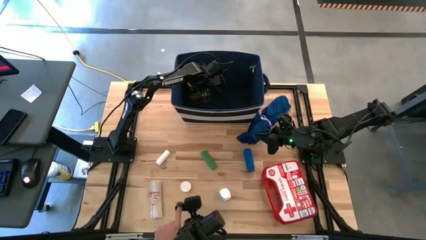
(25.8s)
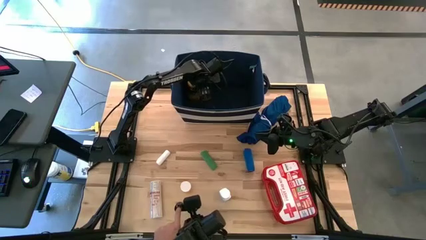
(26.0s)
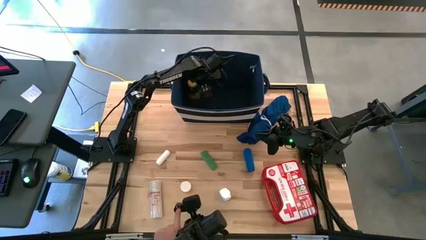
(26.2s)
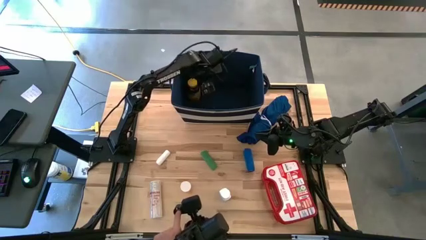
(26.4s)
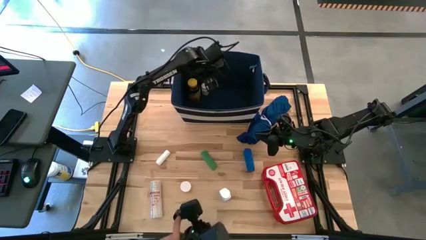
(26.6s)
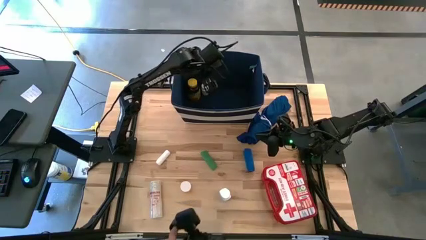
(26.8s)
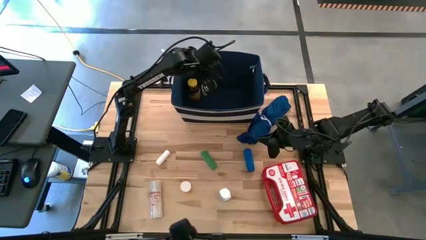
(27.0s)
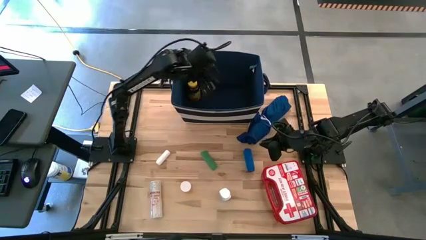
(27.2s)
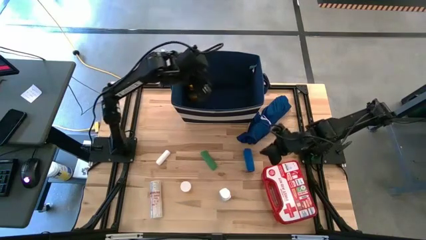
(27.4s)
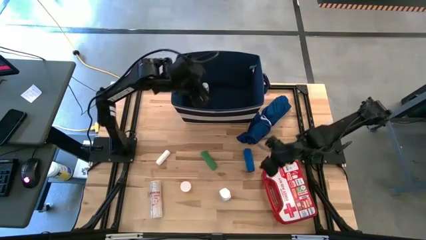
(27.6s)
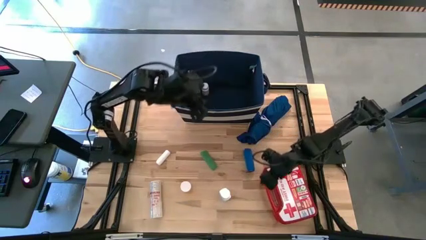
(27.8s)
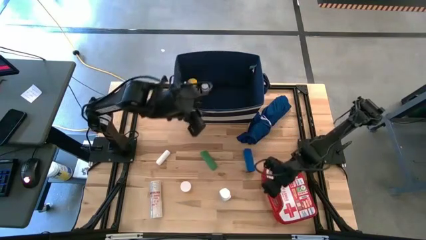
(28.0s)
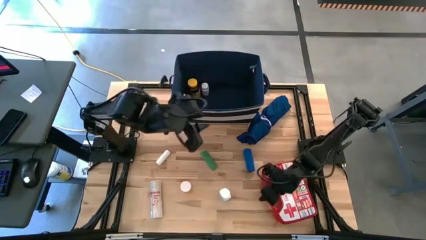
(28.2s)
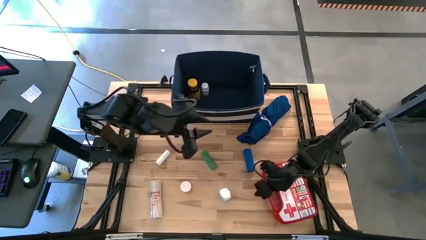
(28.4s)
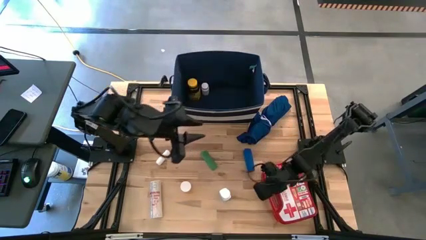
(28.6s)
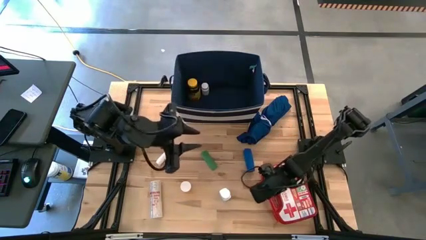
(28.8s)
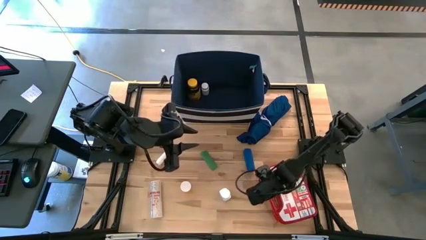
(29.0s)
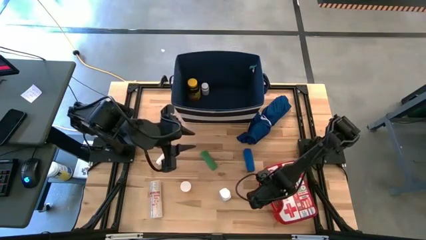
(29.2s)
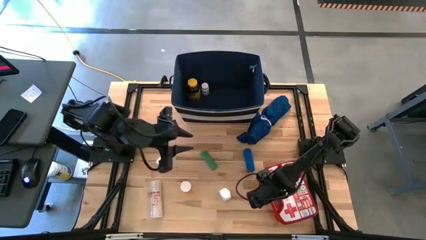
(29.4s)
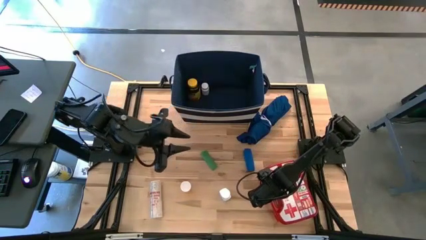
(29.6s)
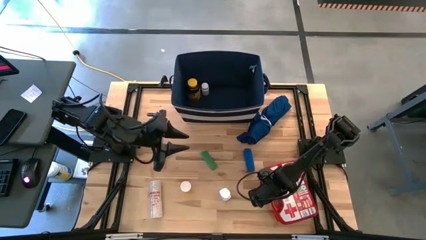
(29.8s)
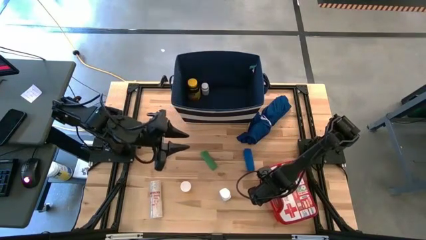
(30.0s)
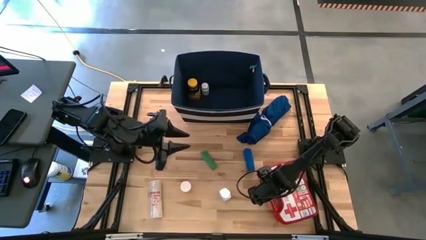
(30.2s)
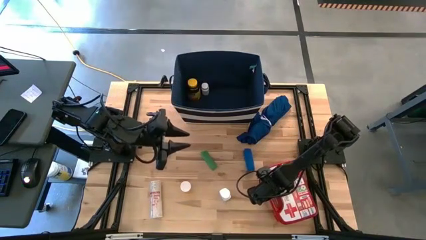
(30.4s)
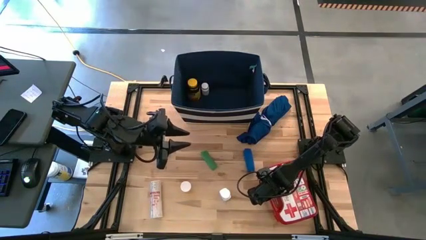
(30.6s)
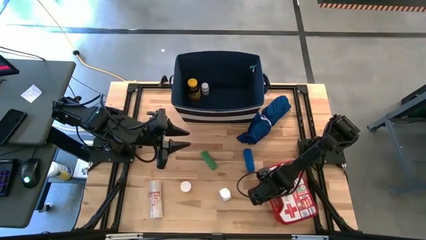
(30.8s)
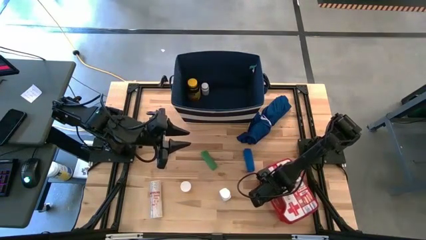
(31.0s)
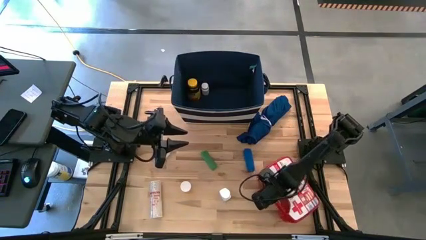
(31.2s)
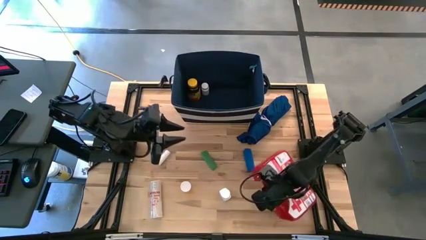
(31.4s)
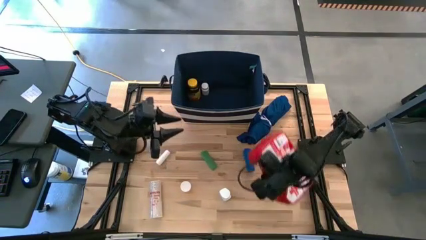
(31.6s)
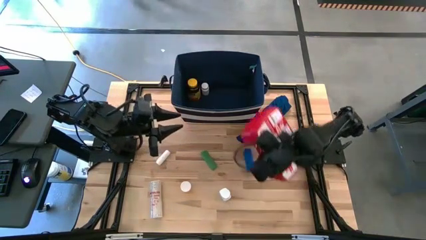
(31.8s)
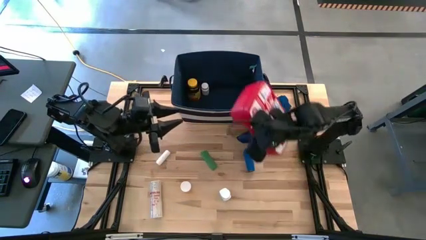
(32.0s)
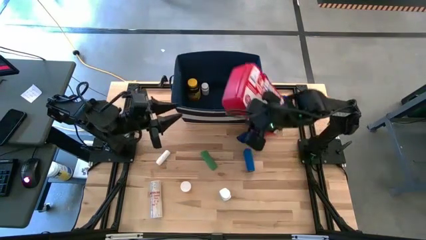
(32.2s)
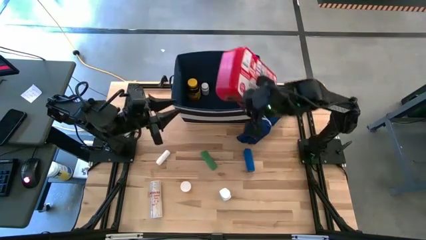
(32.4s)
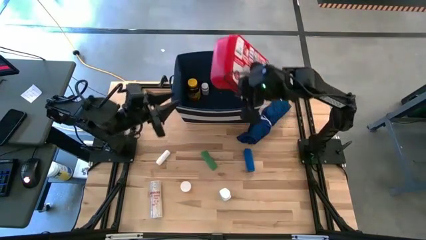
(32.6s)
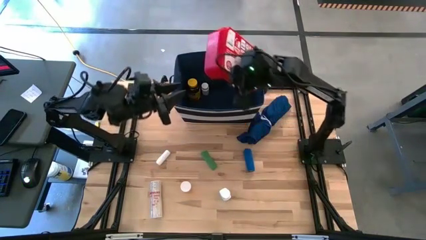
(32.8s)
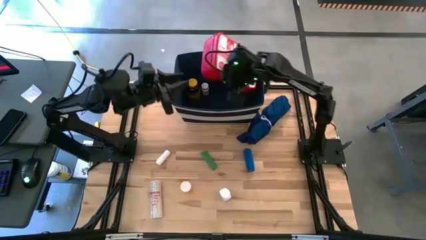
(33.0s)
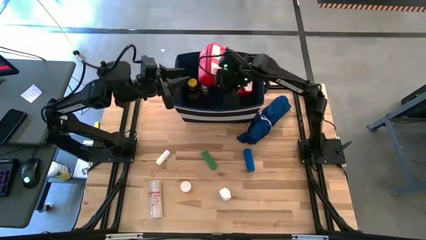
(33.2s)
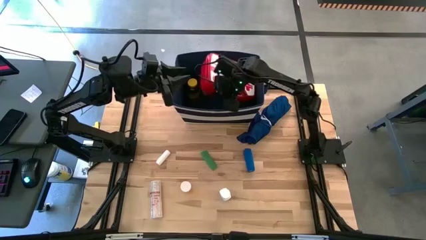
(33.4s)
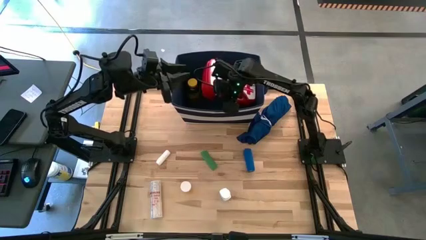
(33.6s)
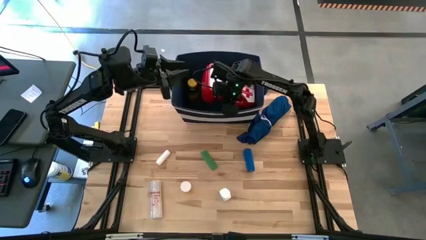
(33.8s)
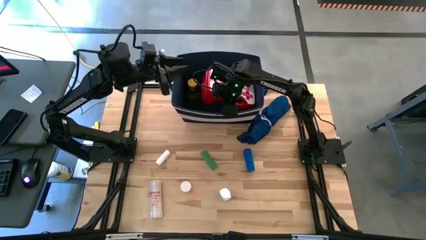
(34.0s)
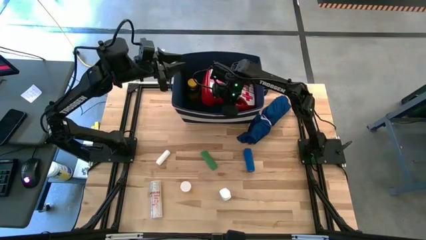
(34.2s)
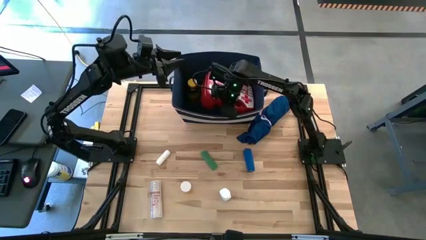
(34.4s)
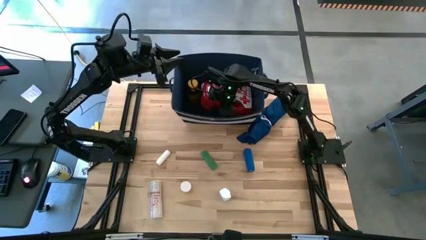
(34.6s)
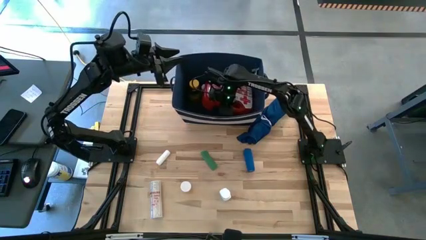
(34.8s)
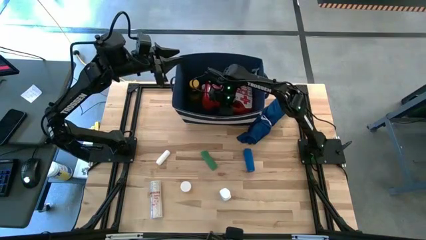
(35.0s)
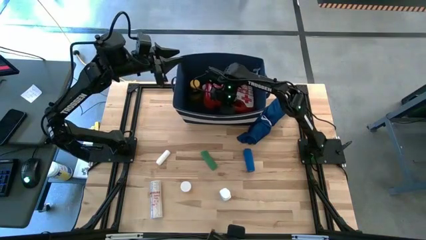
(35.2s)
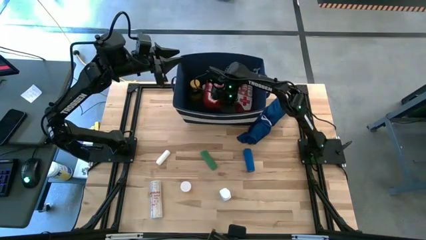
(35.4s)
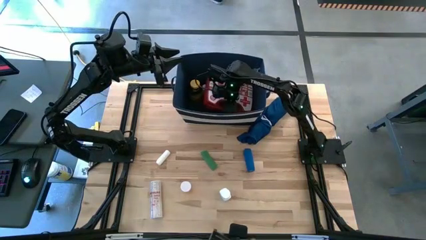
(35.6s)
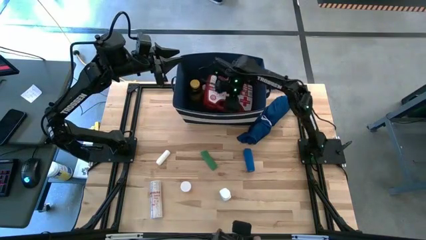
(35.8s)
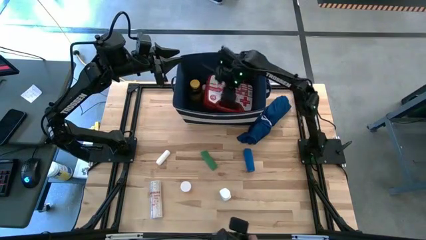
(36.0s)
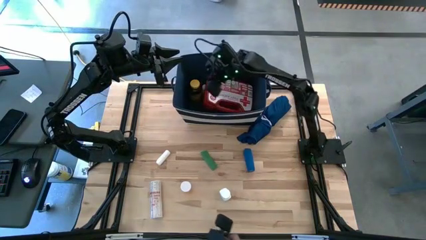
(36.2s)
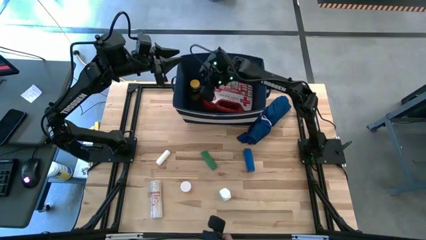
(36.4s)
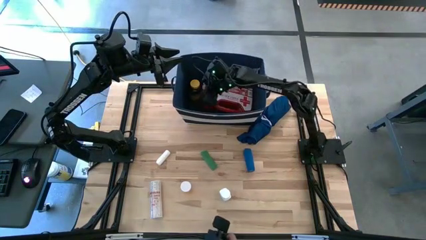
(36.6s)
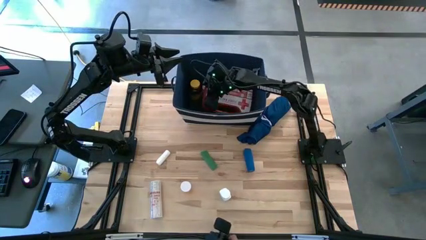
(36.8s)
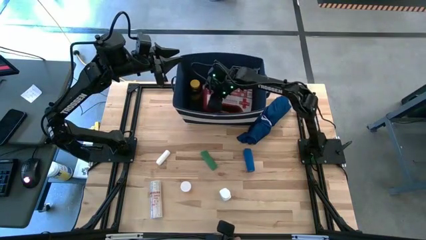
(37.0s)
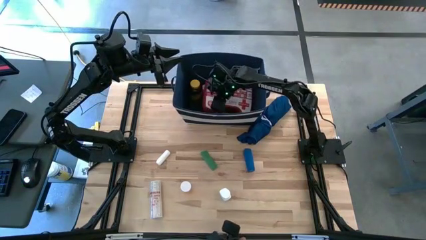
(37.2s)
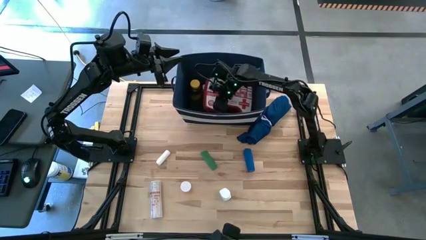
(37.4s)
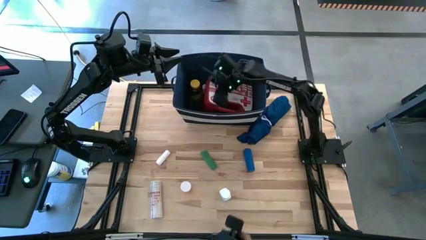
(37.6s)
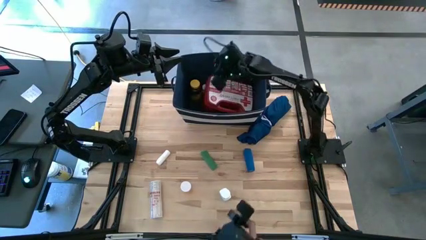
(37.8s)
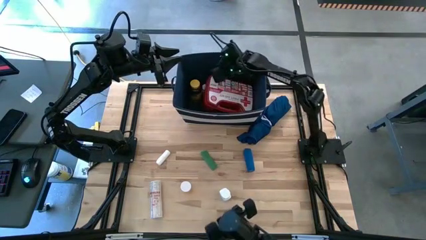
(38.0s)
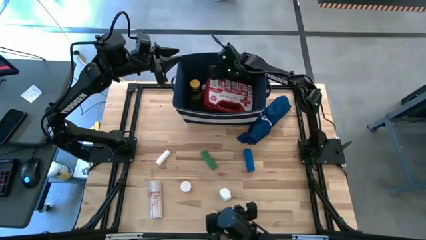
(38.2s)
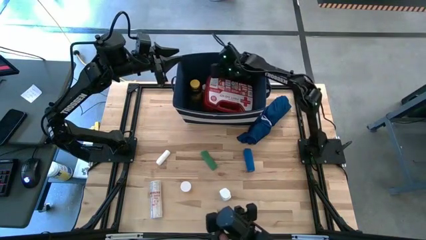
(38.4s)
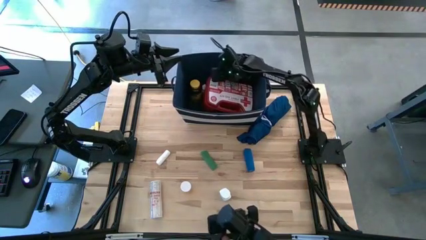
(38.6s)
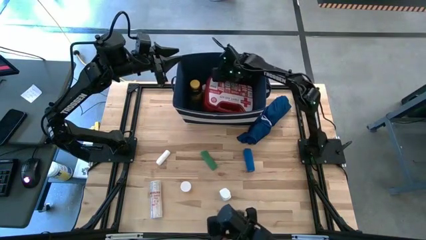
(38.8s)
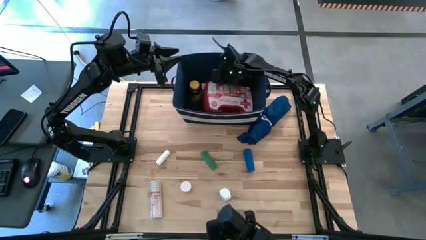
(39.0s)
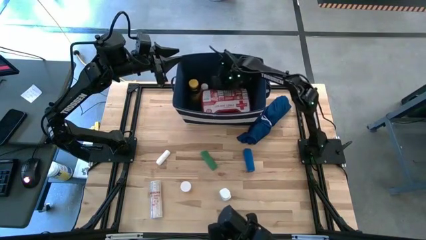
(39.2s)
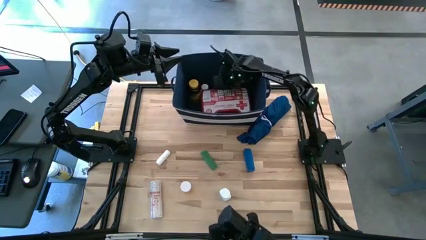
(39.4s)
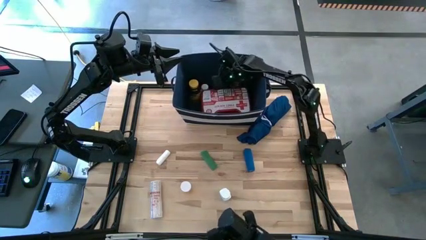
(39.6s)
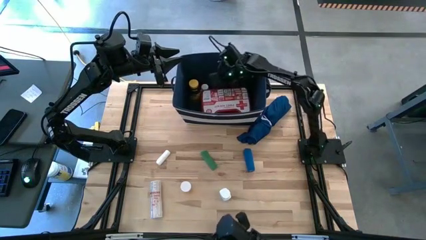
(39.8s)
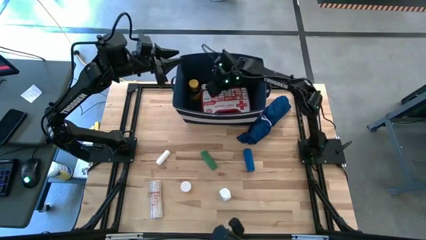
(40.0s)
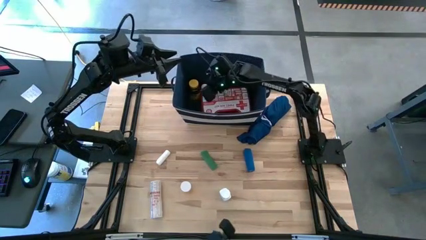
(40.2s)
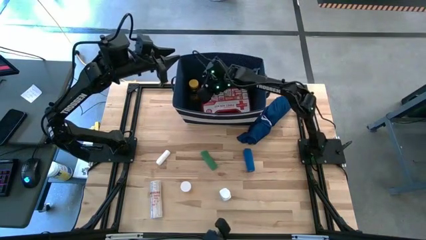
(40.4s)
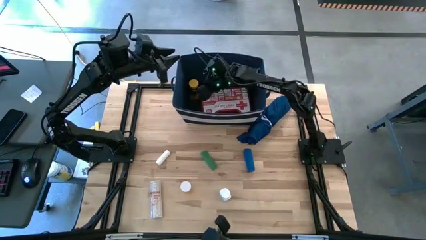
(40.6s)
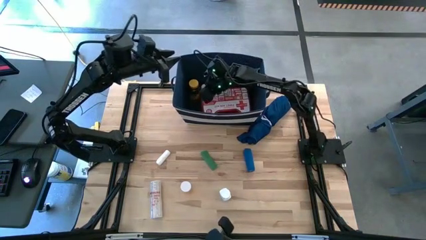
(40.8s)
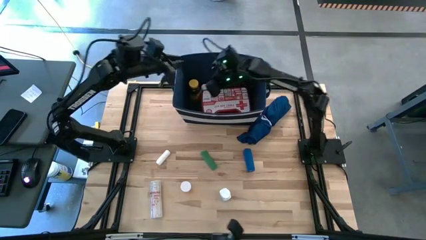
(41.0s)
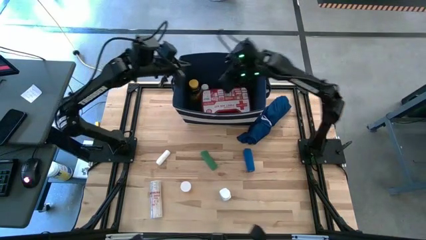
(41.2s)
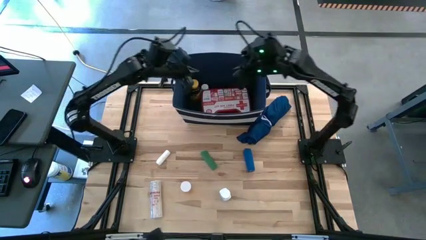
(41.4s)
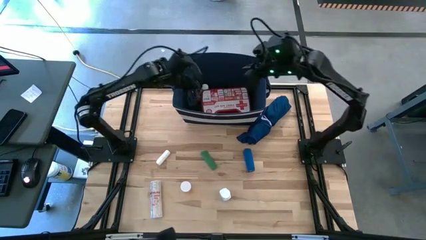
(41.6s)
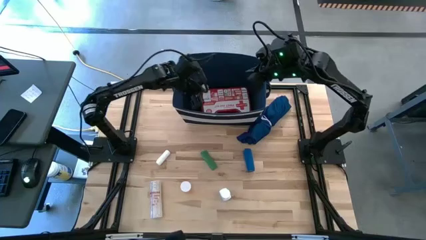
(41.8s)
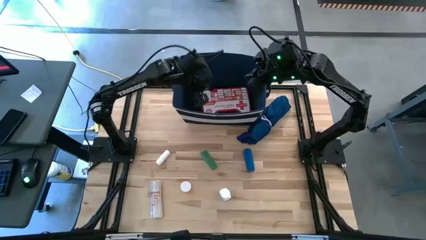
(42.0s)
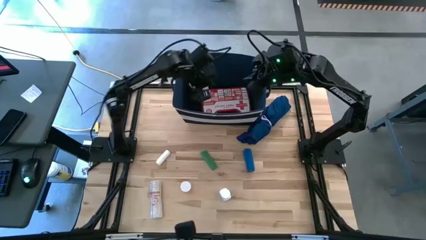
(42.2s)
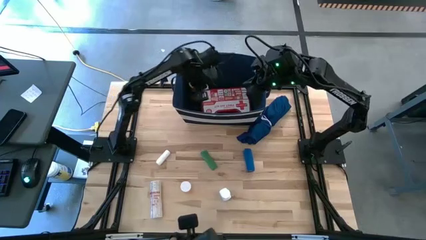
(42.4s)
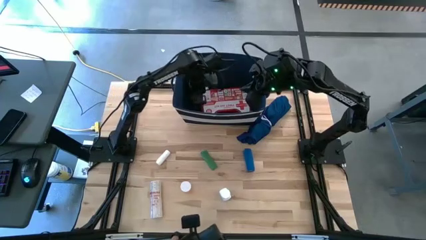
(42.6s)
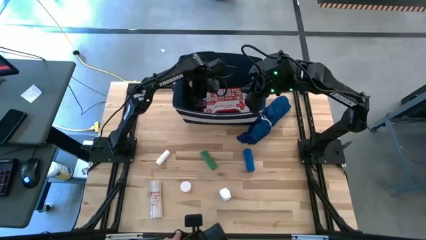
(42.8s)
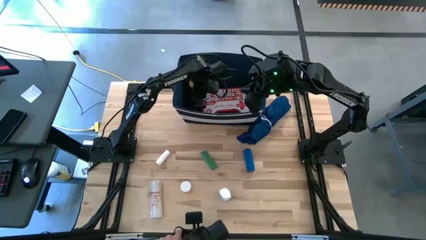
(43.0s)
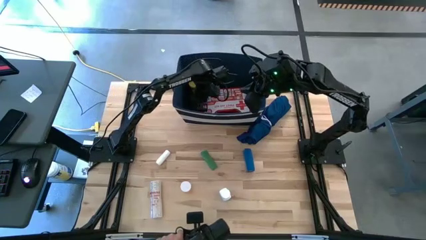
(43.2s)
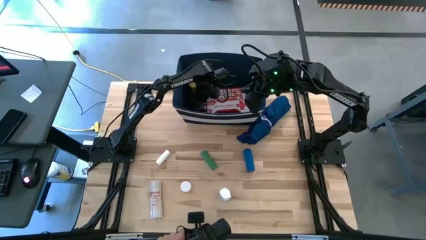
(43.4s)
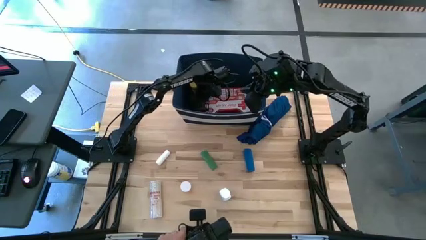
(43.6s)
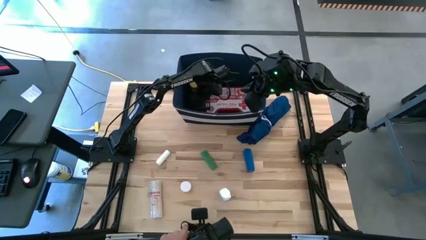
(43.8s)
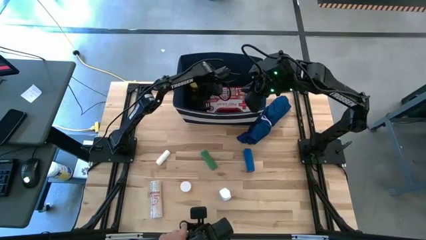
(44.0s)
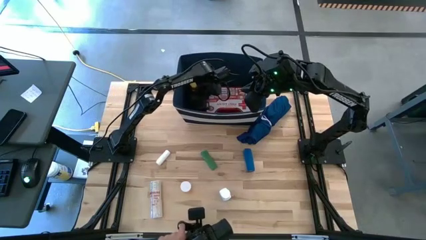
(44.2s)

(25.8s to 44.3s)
Task: Pick & place medical supplies in basket/bin
Put the red first aid kit into the blue bin
